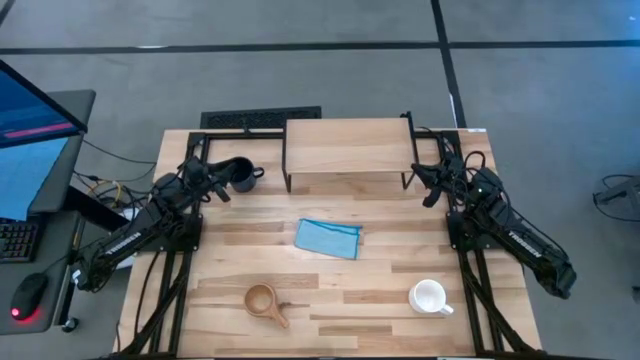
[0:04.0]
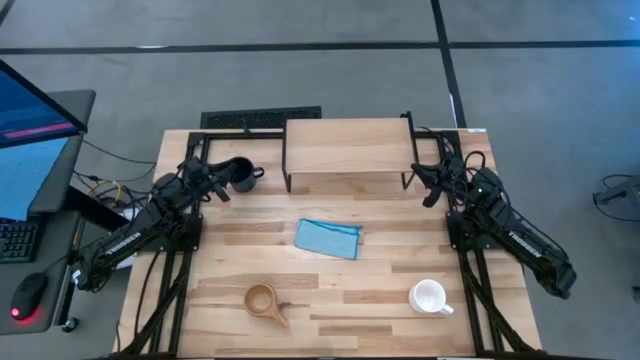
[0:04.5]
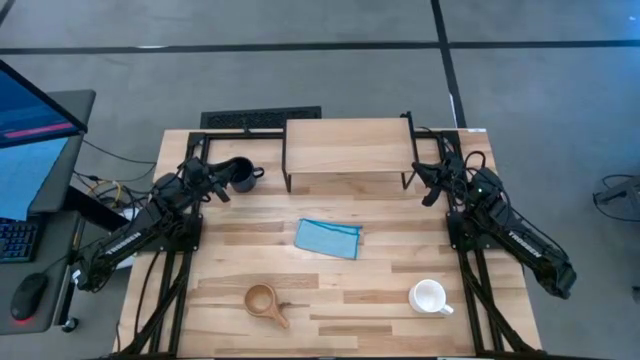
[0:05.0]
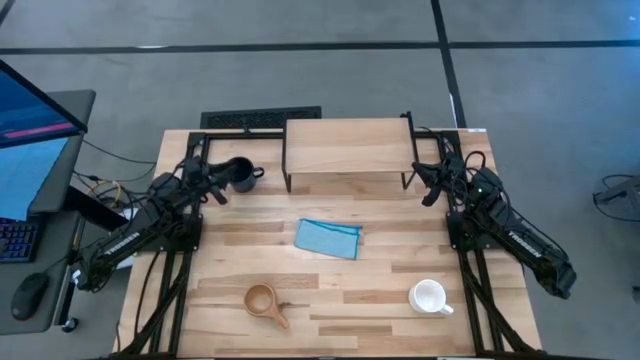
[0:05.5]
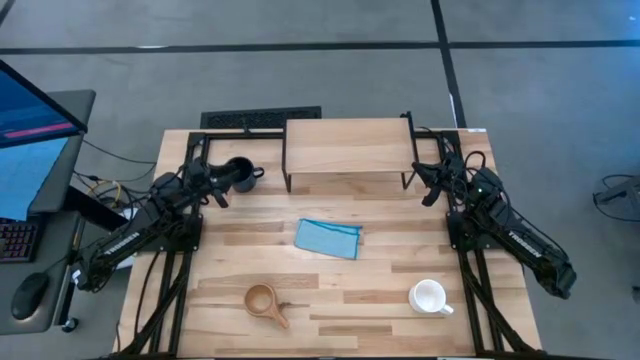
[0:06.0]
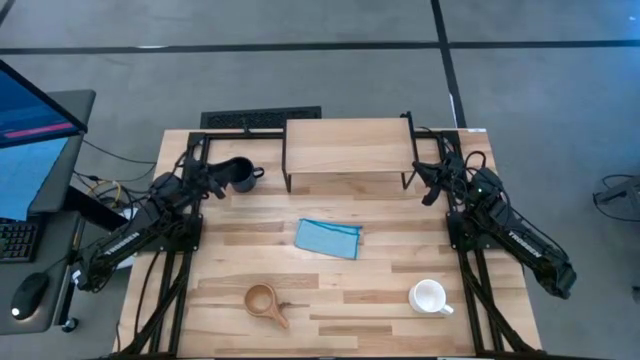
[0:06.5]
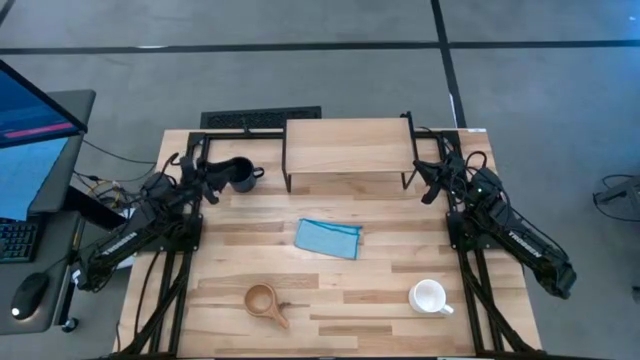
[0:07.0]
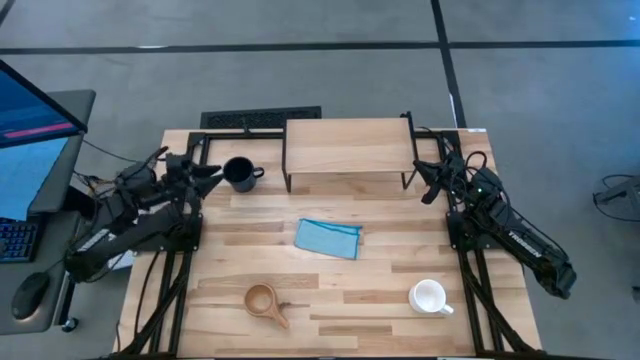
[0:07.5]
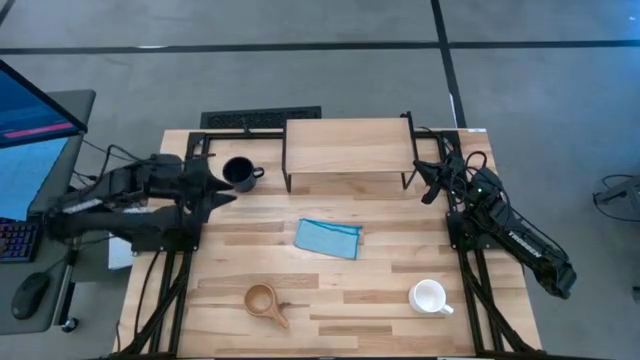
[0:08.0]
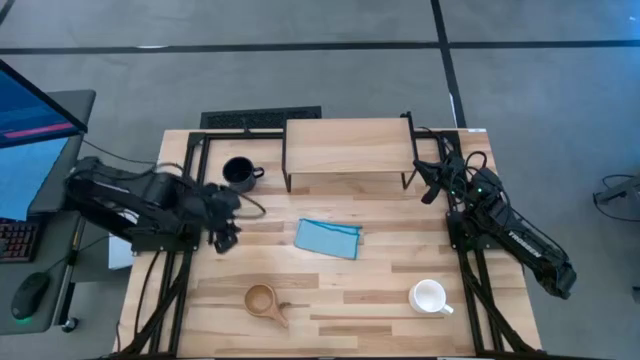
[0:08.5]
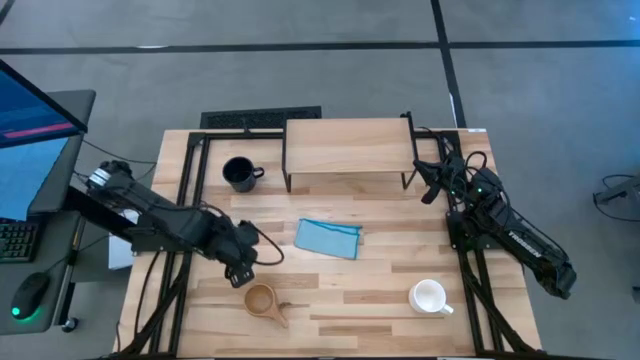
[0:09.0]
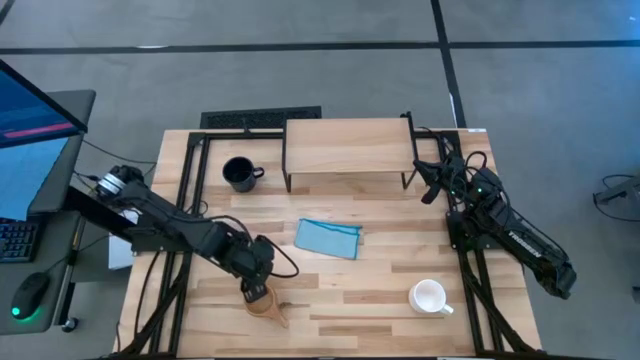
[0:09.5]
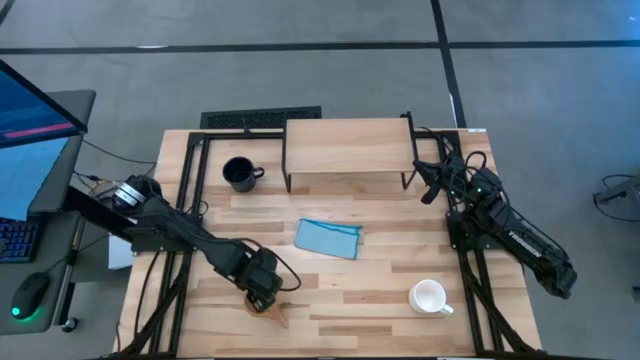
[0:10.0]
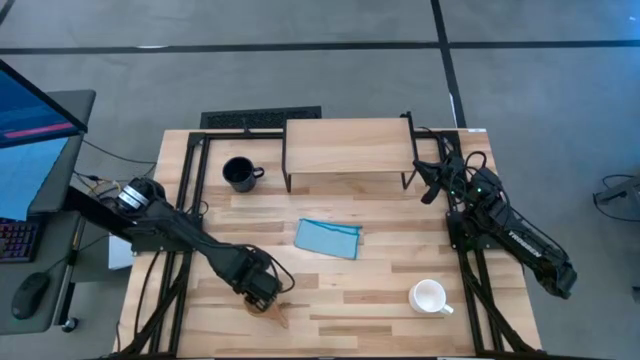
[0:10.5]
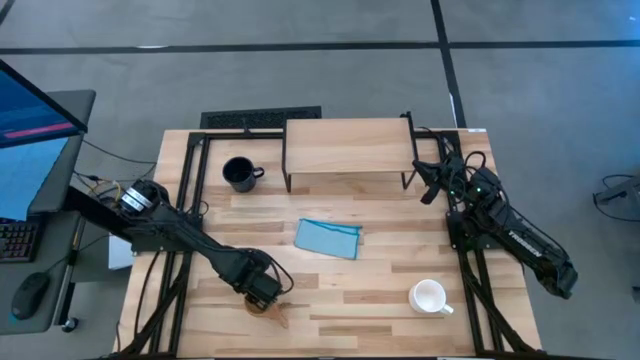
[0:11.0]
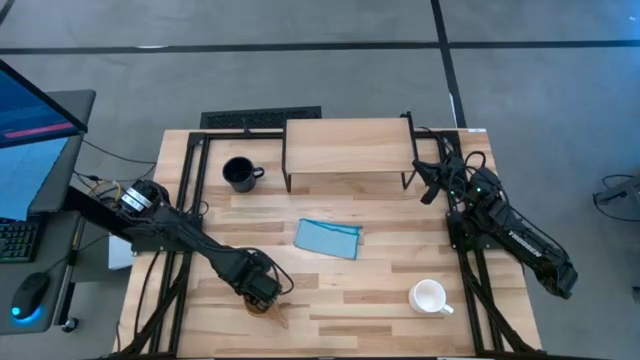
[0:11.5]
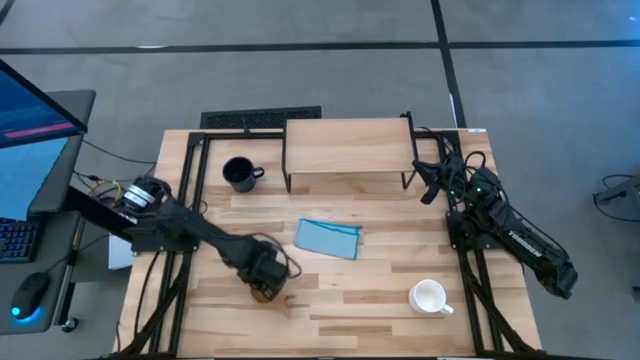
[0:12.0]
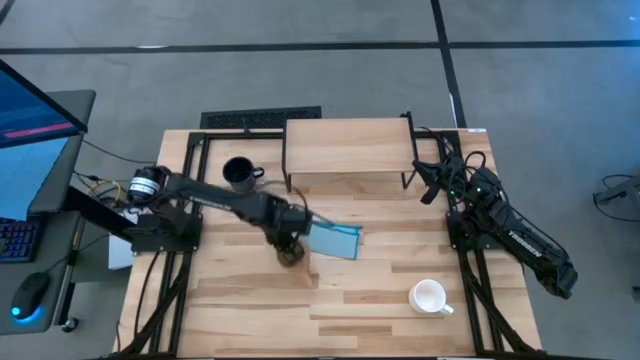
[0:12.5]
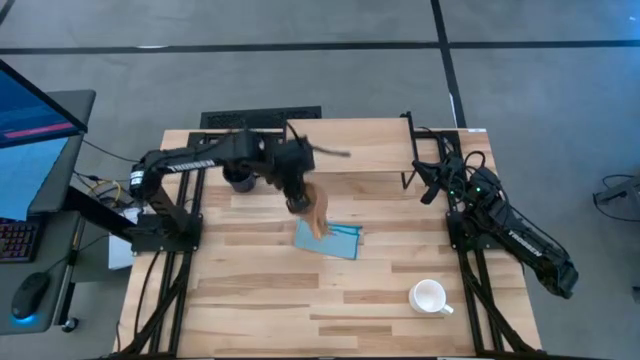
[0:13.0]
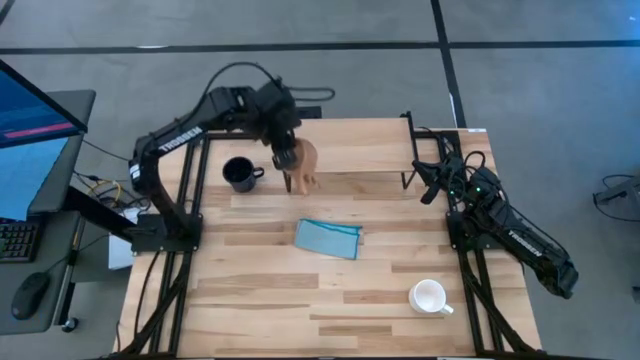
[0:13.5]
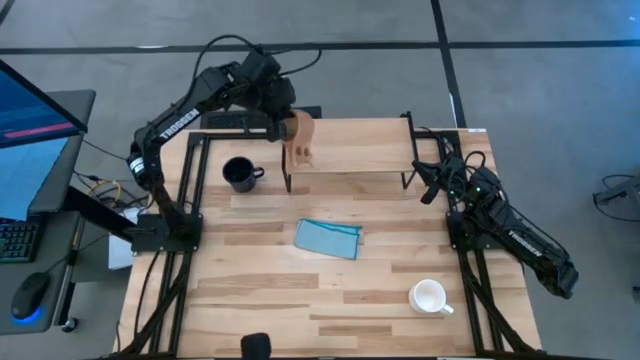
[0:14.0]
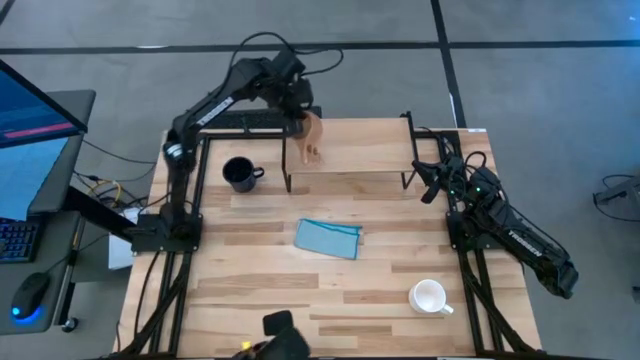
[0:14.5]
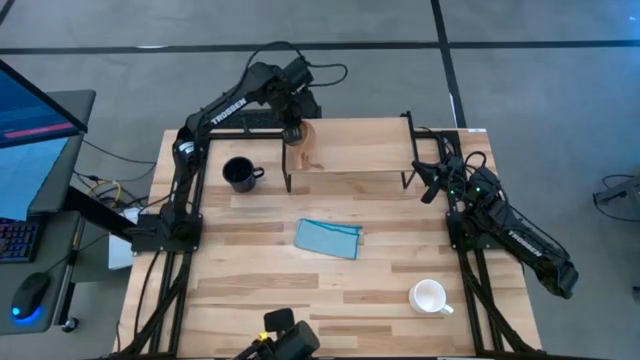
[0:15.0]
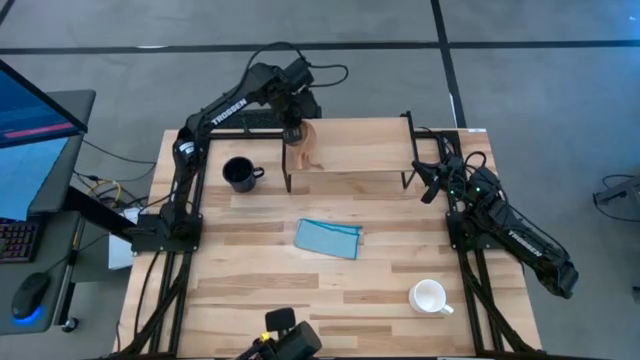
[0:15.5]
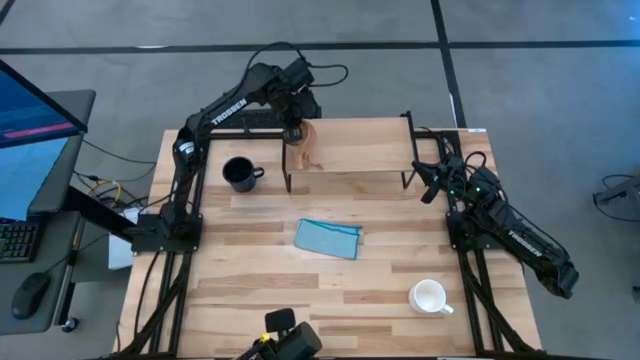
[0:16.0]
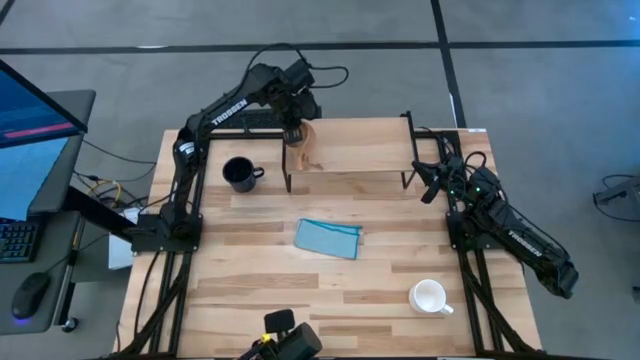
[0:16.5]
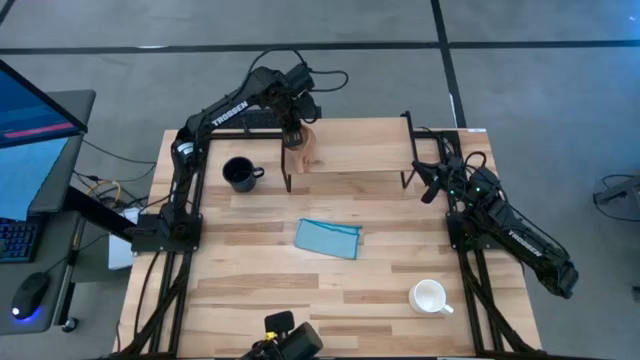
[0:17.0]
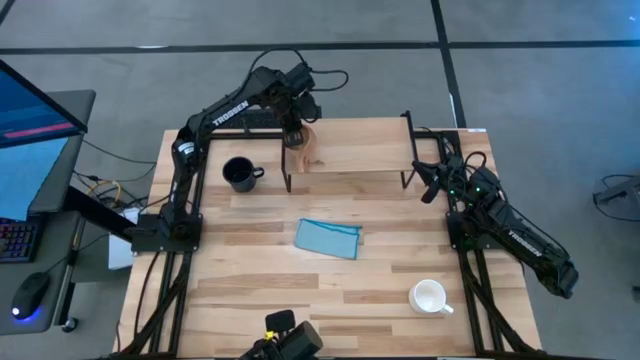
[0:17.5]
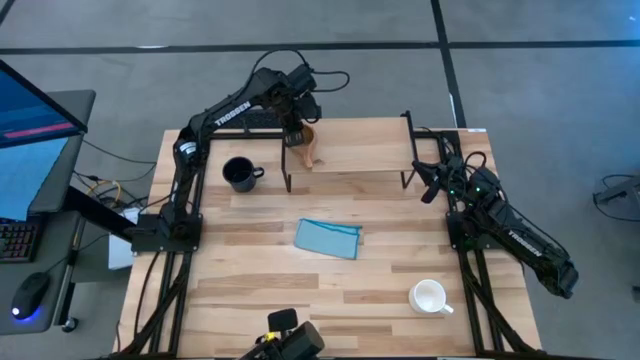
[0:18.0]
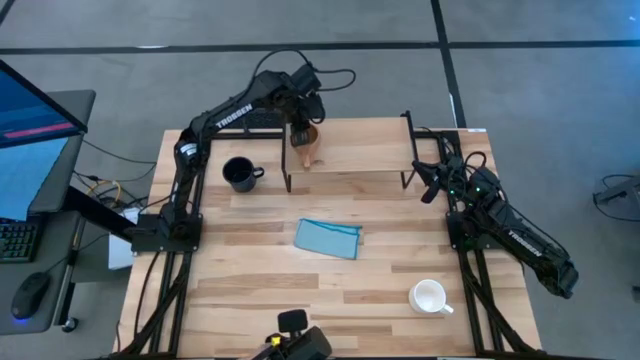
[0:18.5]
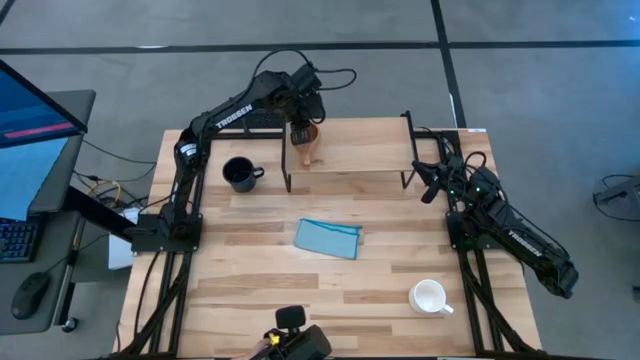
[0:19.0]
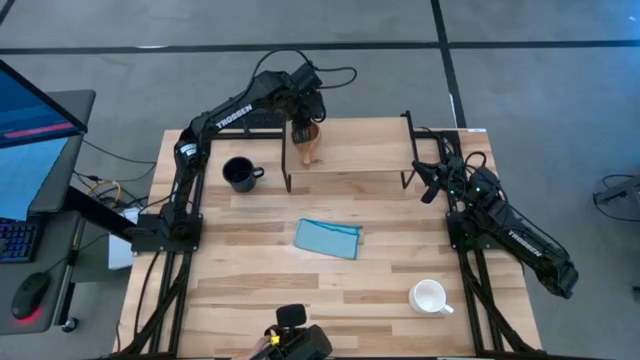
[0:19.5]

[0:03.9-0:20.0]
Task: Stack small to large cups/mugs on shelf
Put the brown mug on the shelf

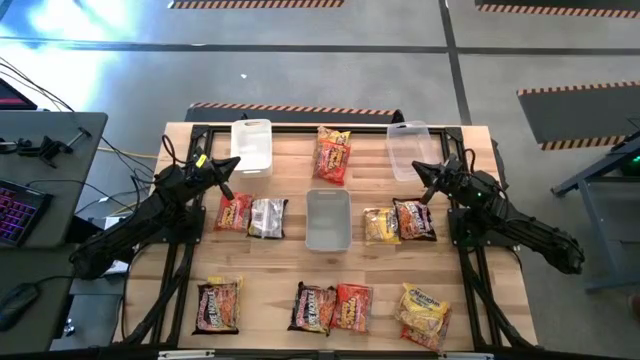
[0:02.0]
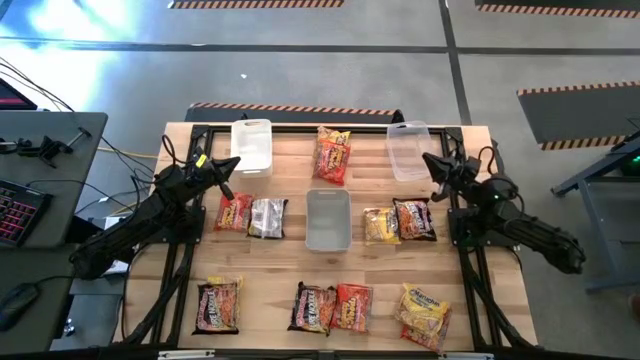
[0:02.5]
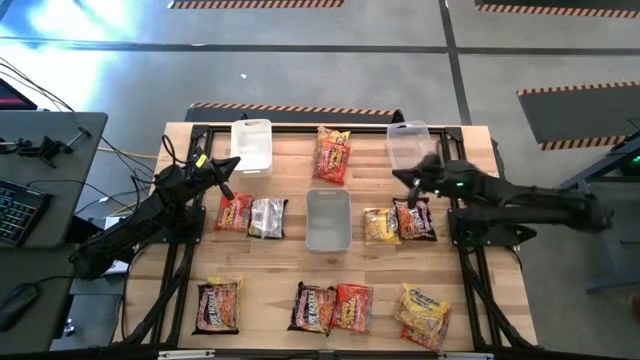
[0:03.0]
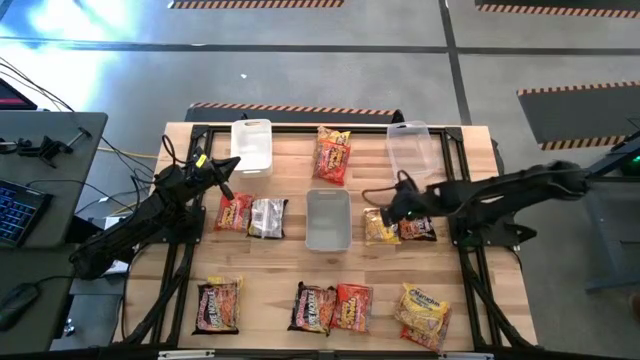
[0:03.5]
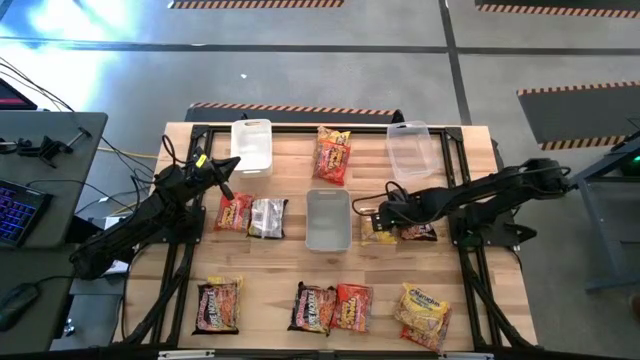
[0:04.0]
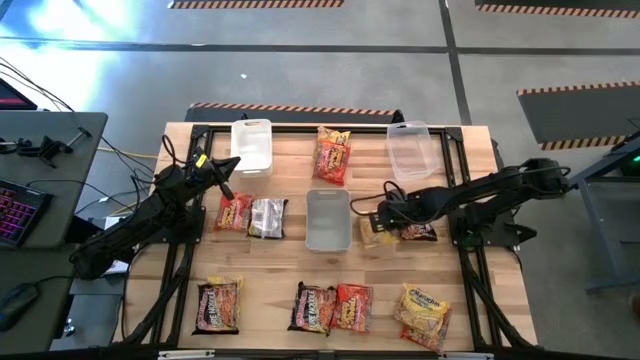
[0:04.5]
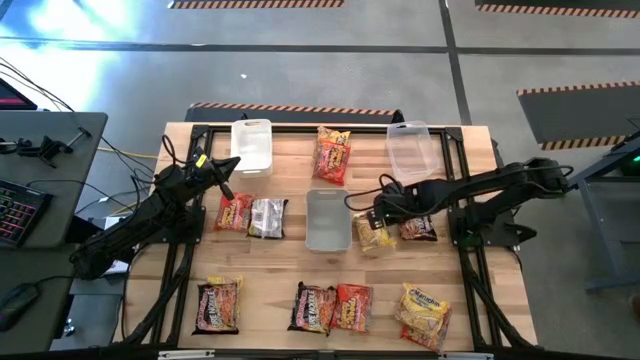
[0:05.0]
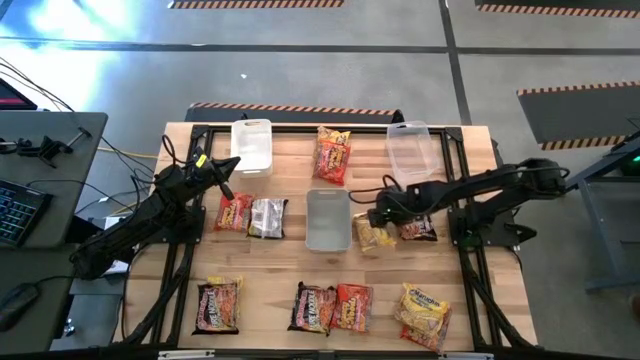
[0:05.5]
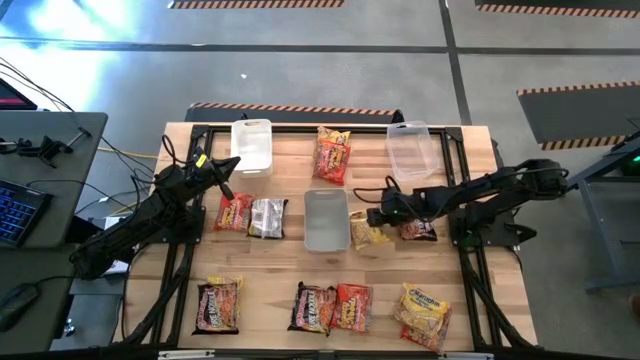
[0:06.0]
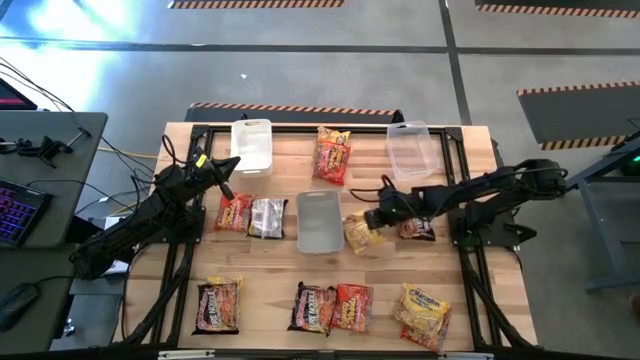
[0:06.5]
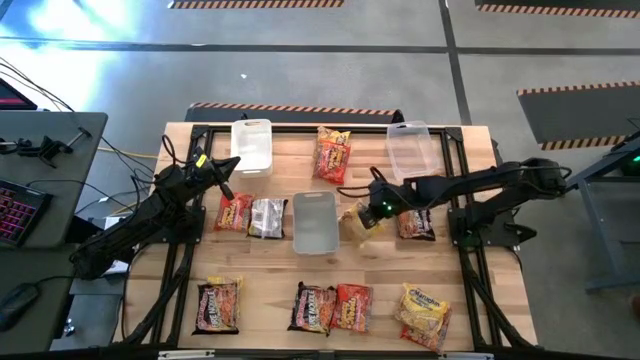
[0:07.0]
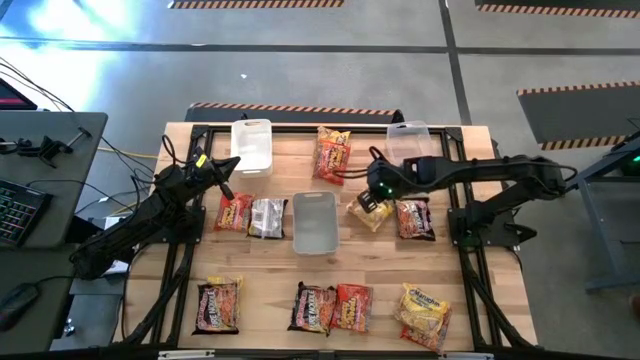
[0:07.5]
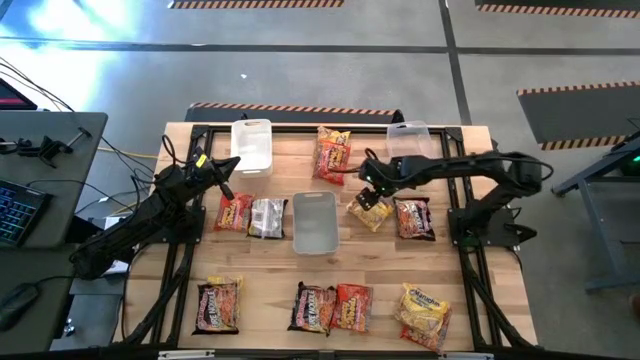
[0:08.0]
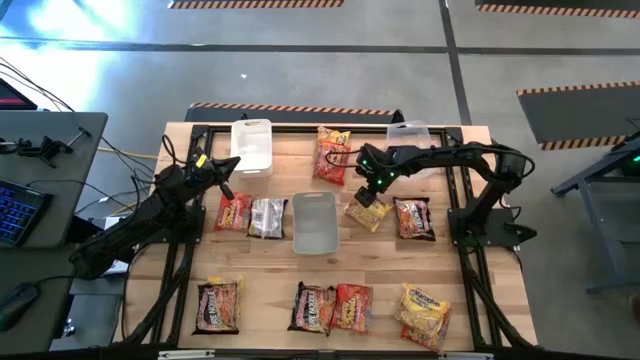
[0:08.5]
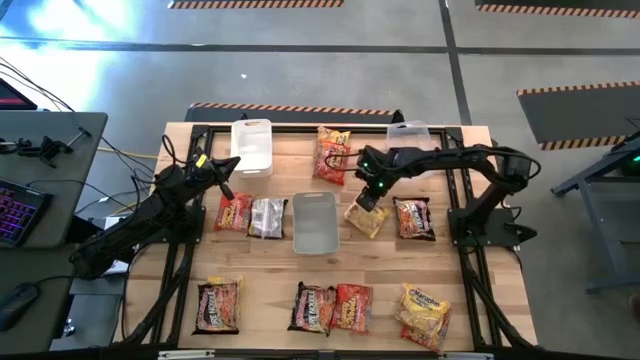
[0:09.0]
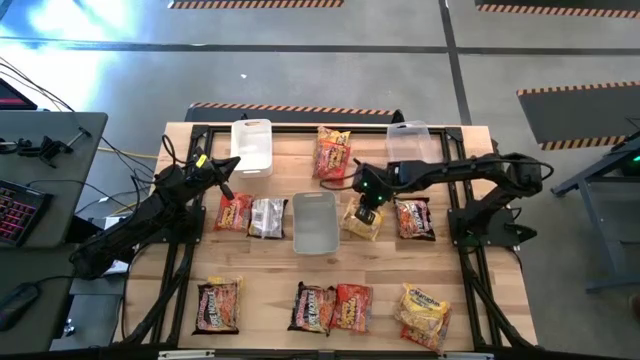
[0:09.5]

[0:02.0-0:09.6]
Task: Sort Maruchan noodles
Put the yellow noodle pack into the gray bin
